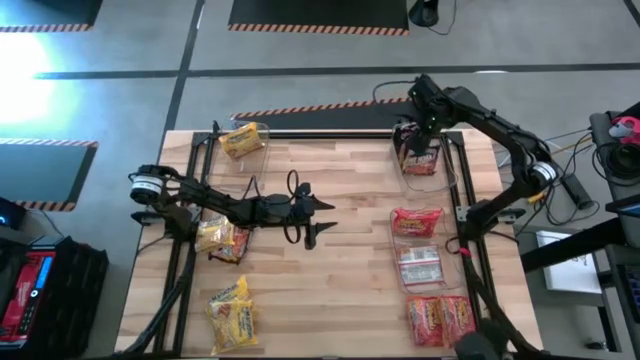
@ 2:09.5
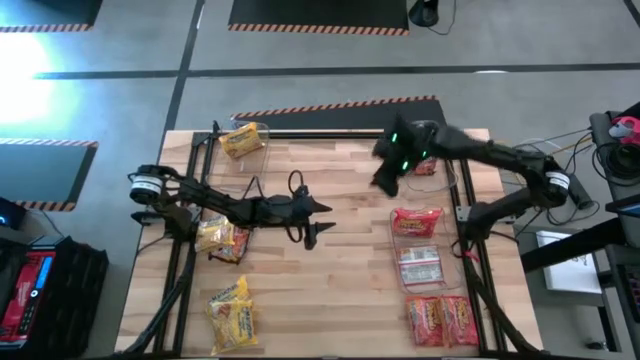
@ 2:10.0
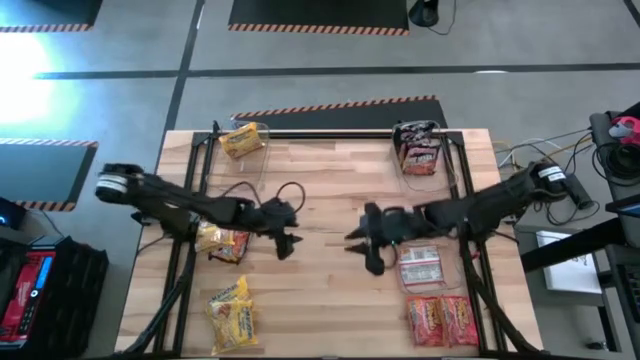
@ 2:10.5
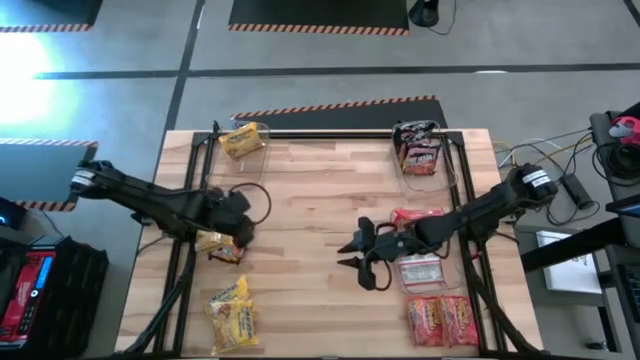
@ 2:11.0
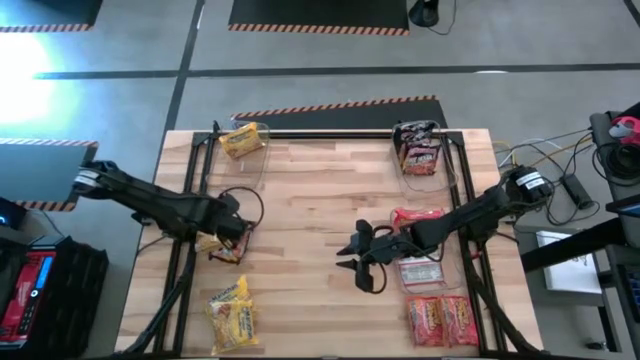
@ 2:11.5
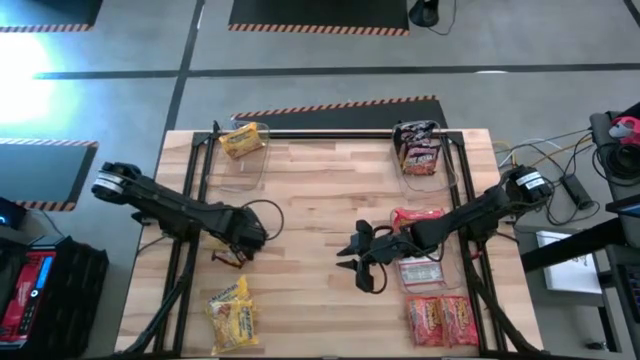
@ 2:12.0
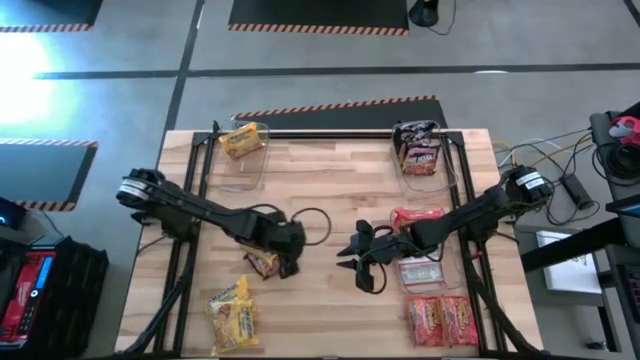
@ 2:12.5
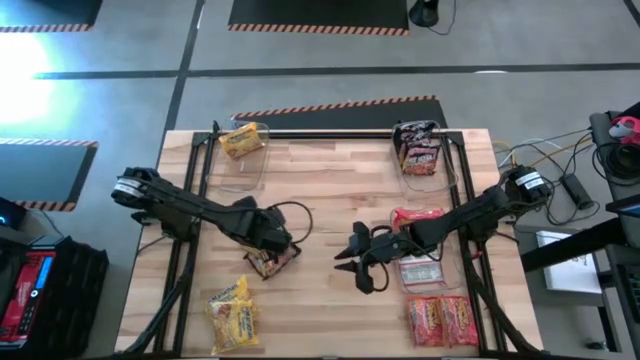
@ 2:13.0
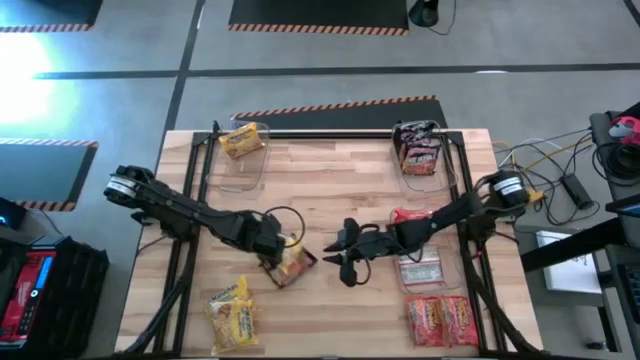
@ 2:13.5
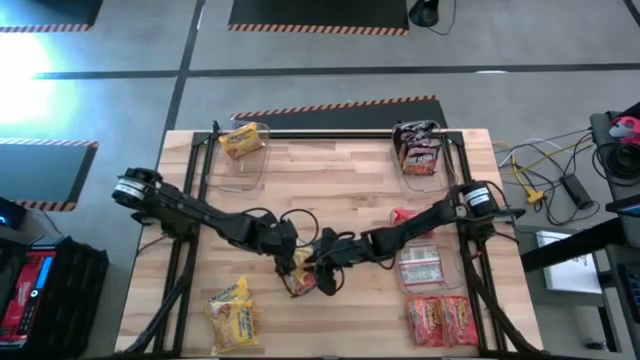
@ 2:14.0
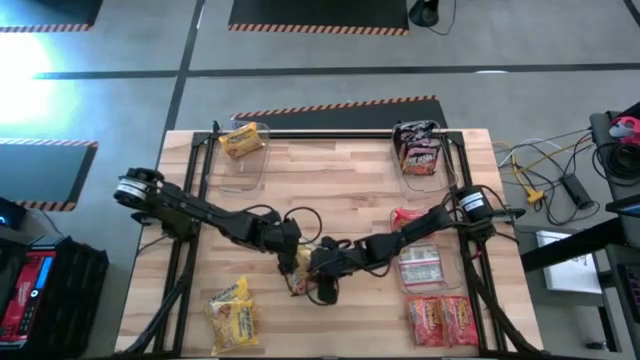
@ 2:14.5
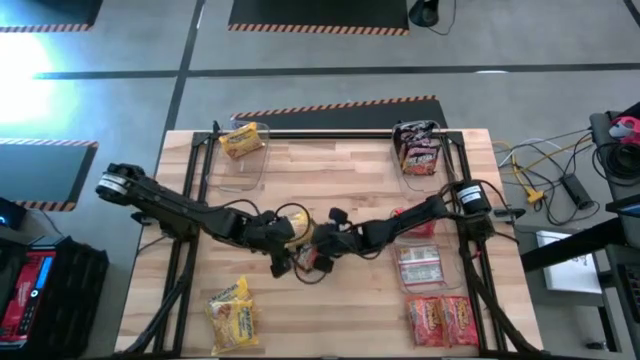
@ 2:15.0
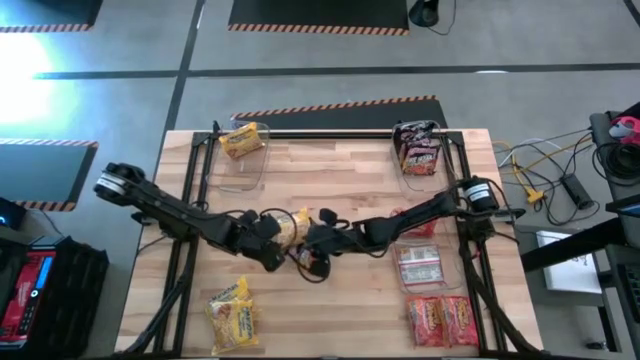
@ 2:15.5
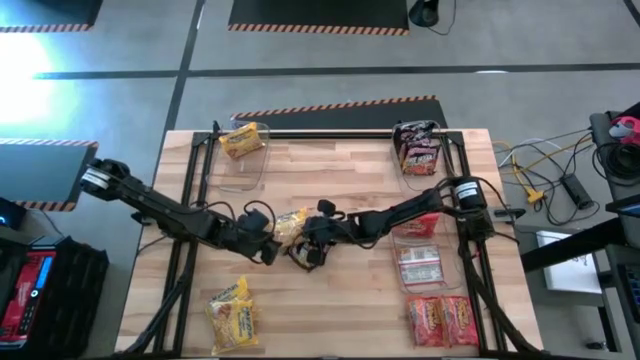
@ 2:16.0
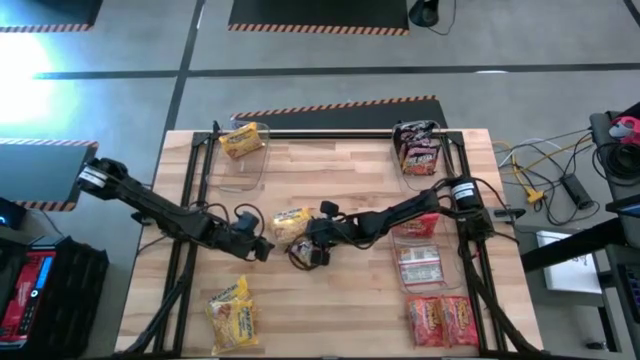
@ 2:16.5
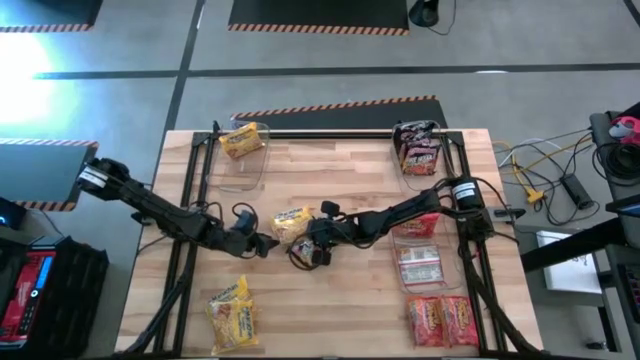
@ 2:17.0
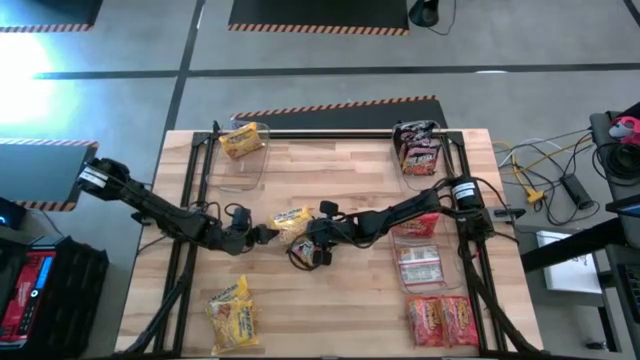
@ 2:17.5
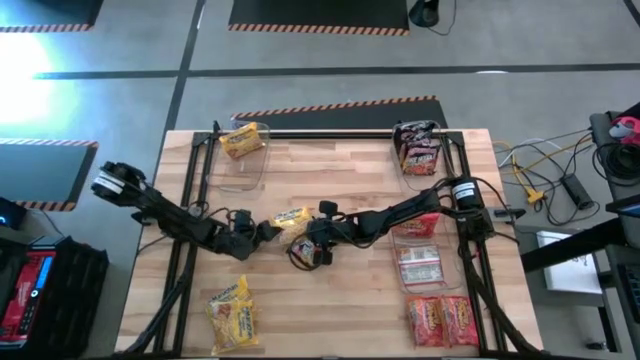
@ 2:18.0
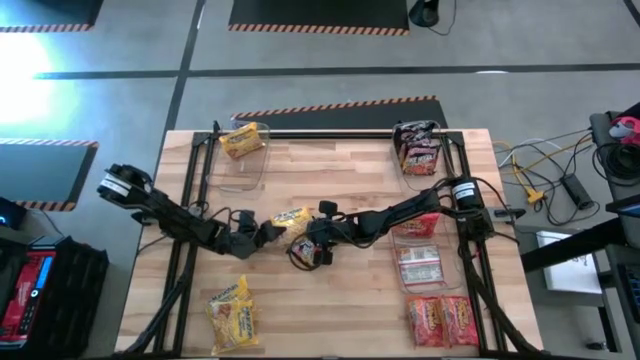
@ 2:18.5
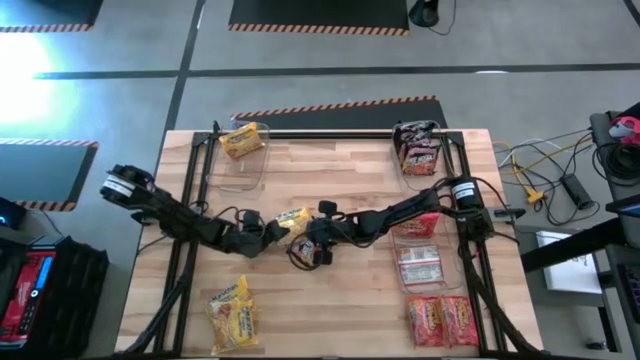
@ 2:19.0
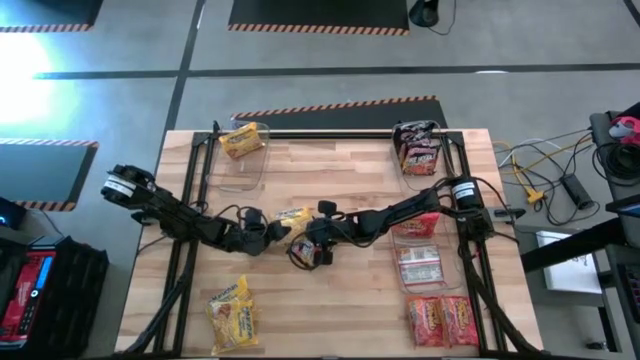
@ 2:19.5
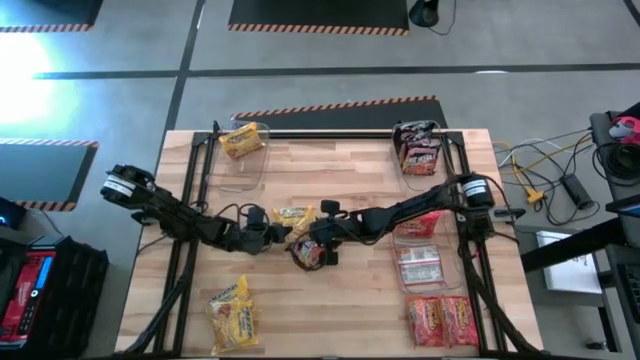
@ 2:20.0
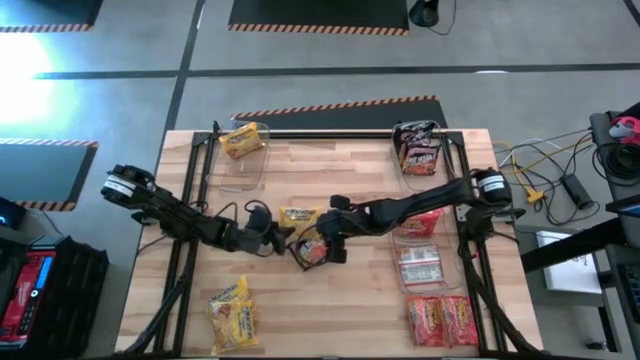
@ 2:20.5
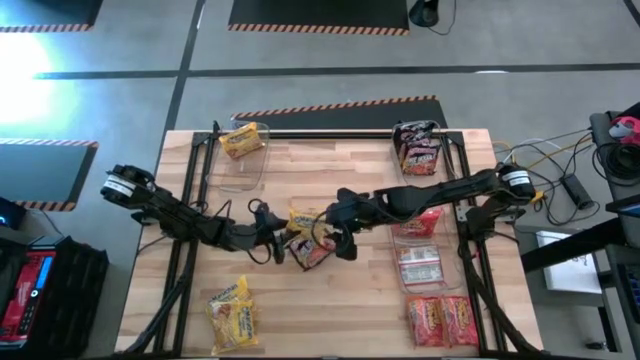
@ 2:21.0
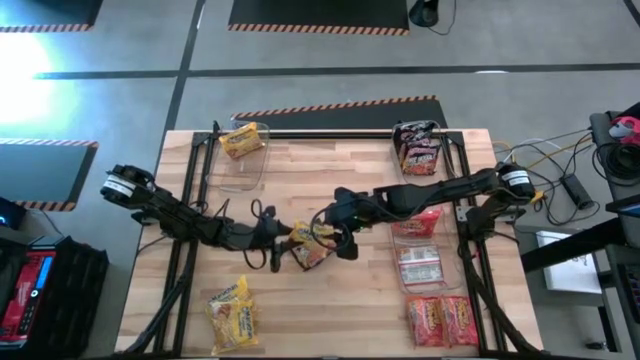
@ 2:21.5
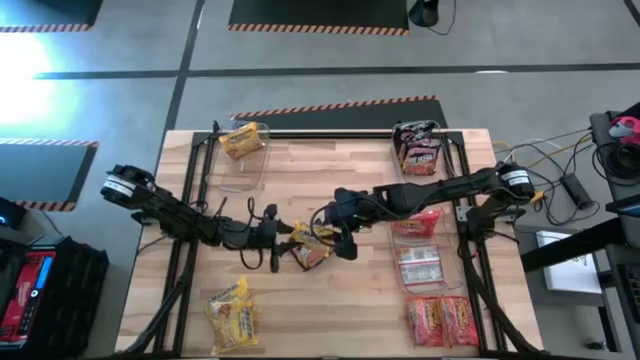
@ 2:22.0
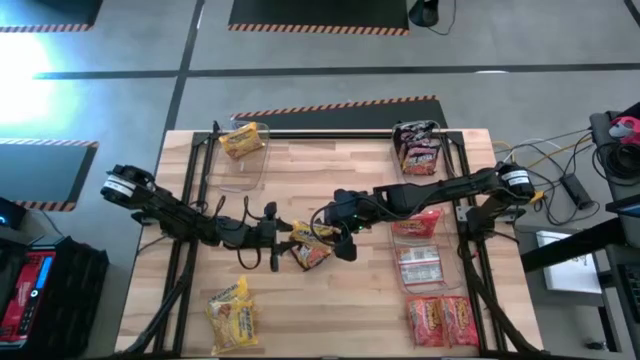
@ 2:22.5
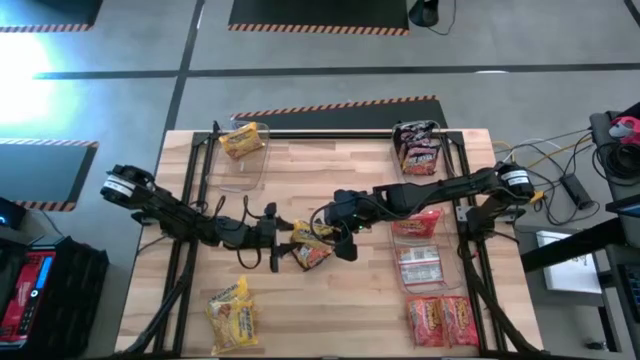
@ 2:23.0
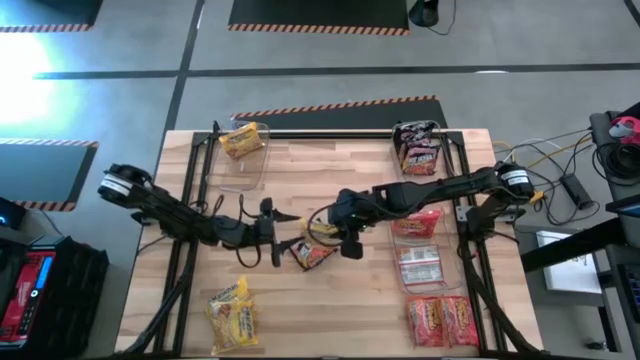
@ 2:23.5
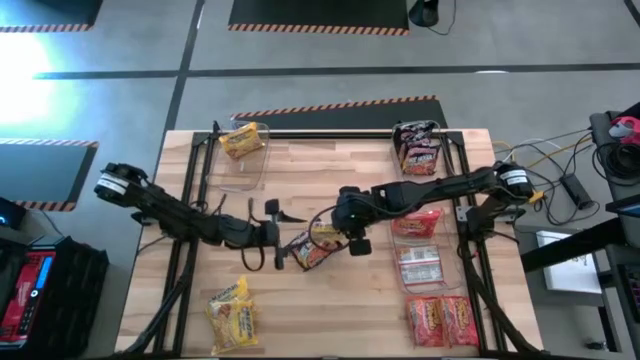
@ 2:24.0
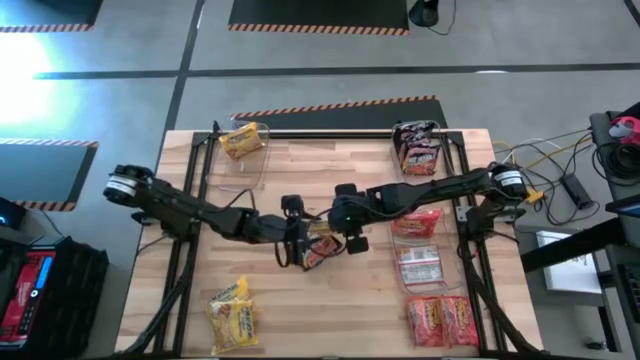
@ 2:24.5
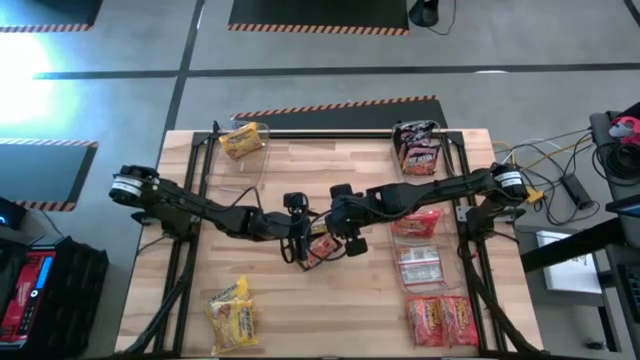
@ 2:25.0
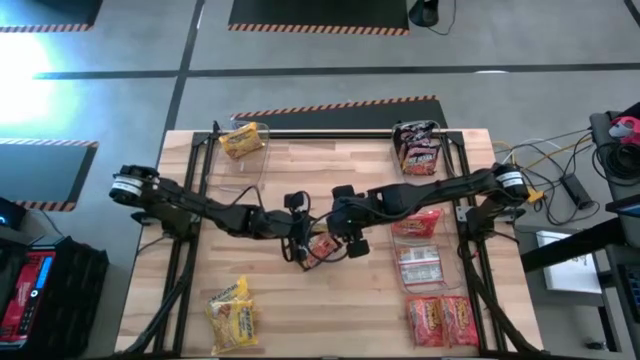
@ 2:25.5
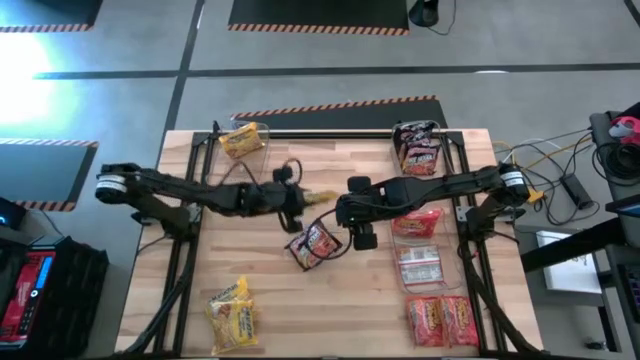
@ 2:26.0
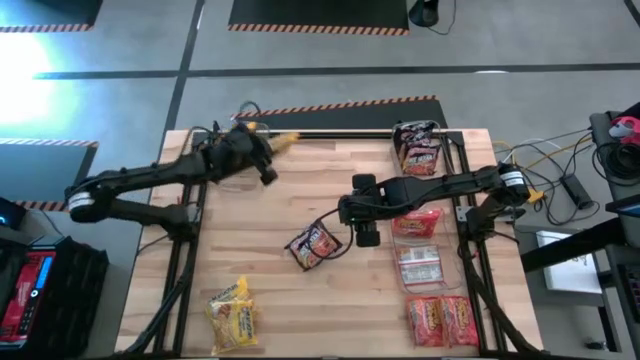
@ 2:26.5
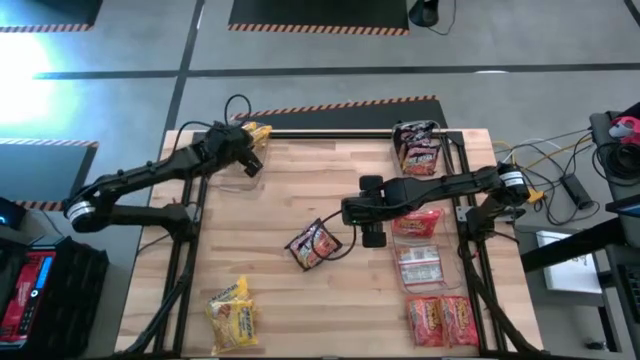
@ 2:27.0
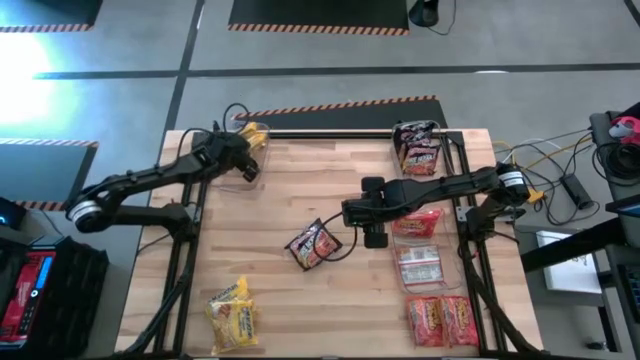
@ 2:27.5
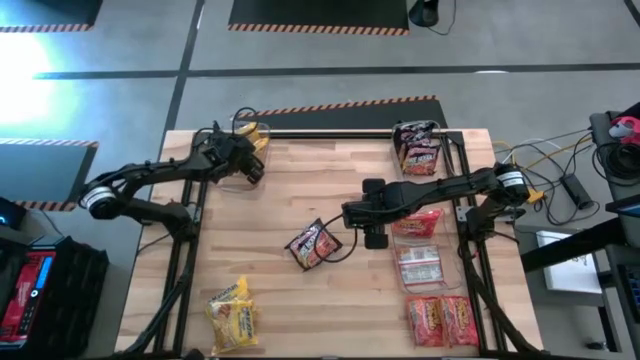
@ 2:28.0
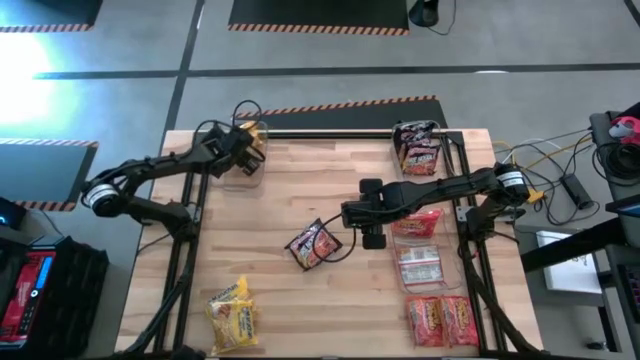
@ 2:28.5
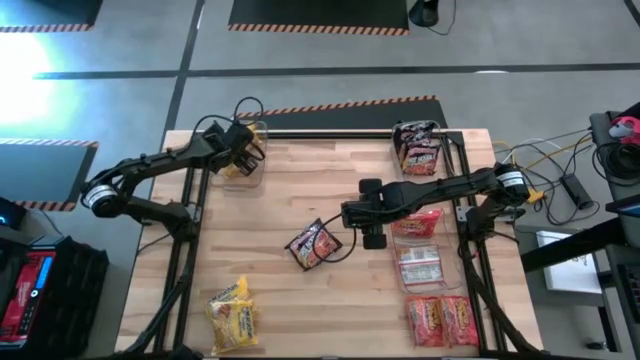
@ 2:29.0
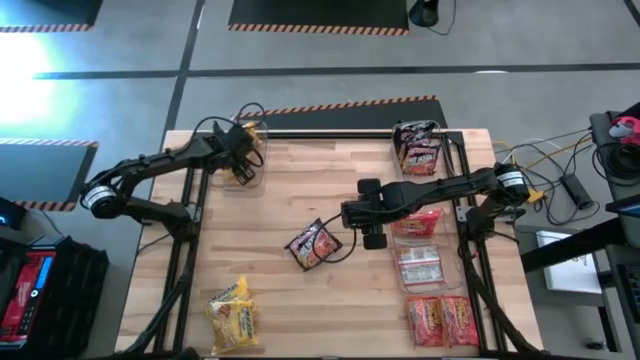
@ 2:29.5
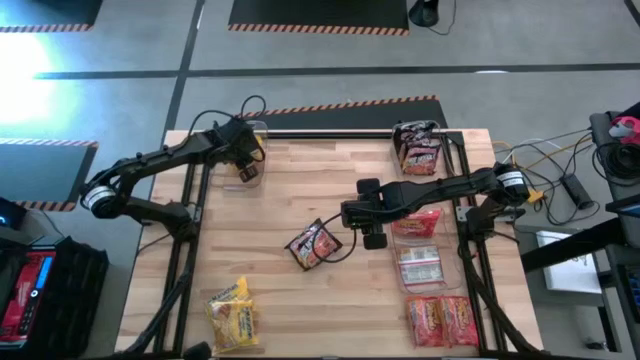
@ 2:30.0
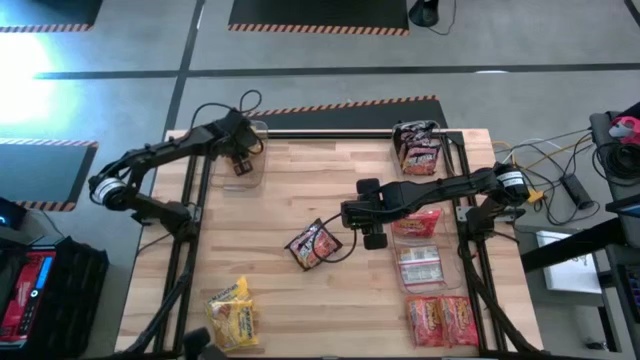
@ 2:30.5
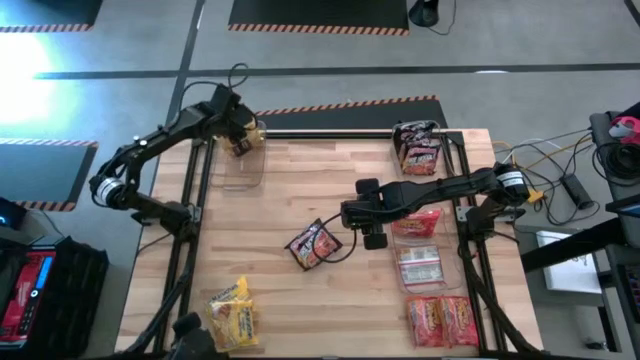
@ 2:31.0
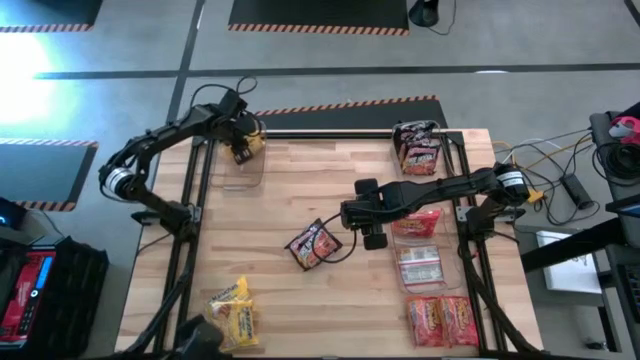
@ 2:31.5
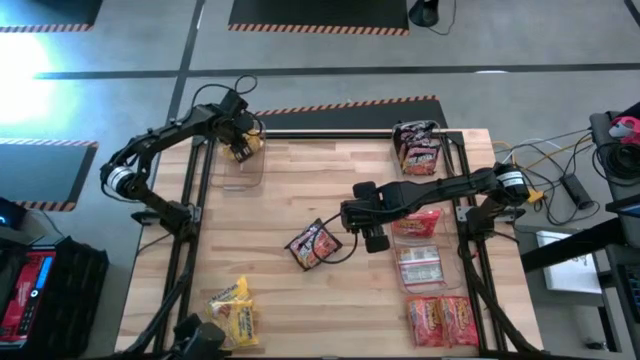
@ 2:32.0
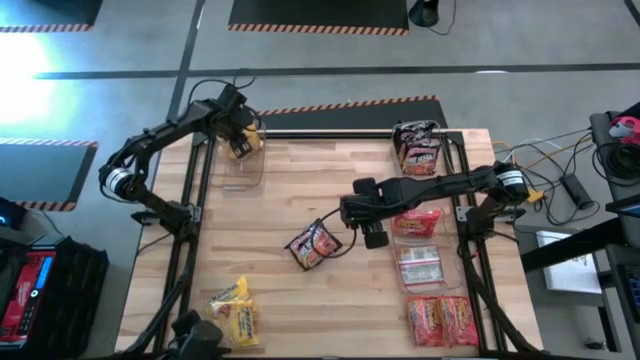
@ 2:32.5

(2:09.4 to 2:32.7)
Task: Sort Maruchan noodles
Put the yellow noodle pack into the top left transparent bin
